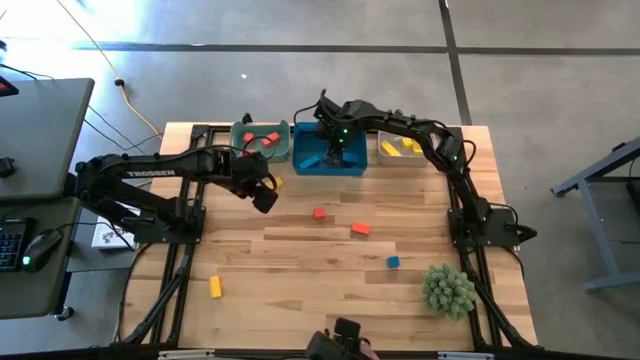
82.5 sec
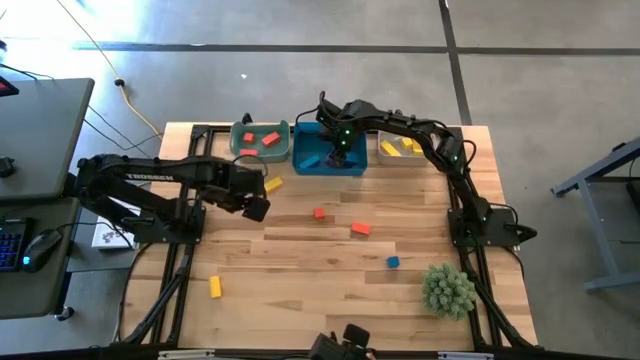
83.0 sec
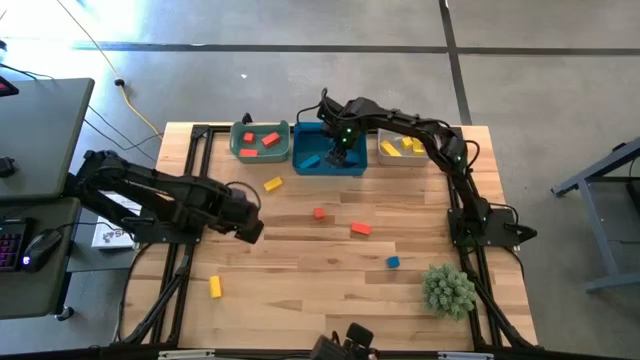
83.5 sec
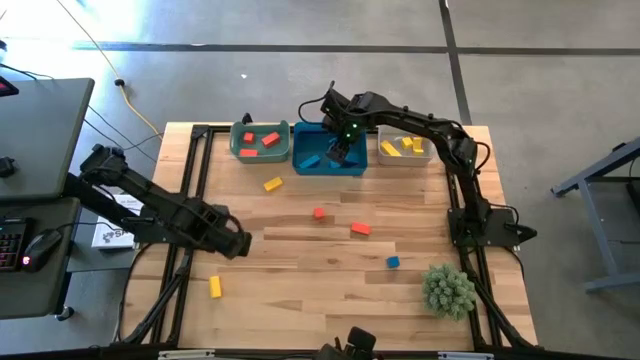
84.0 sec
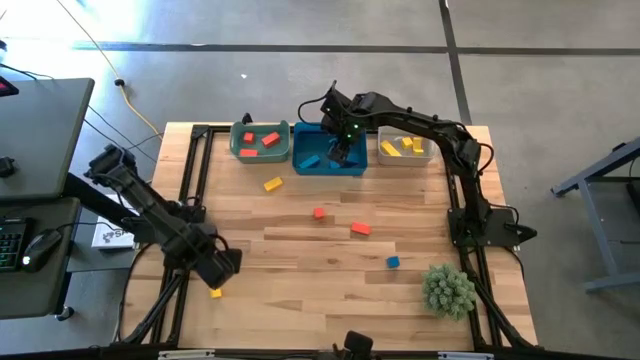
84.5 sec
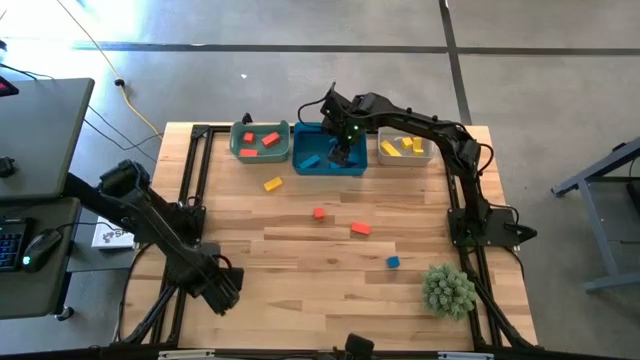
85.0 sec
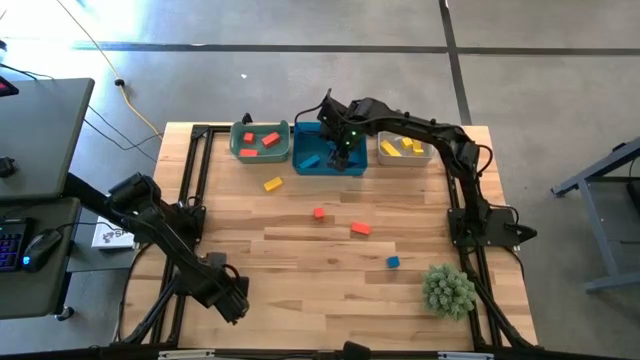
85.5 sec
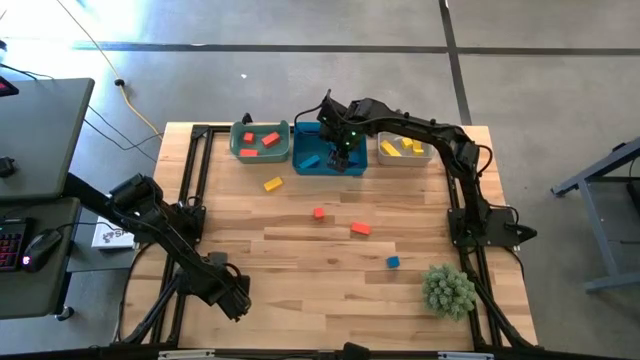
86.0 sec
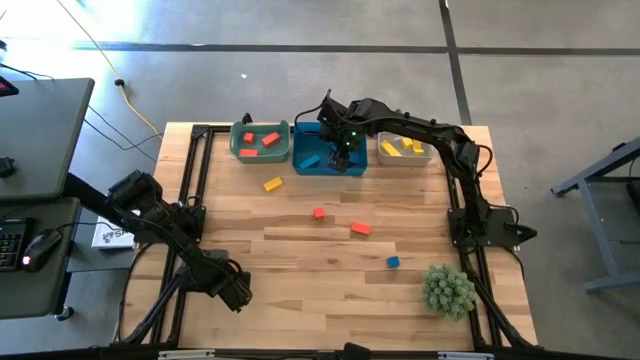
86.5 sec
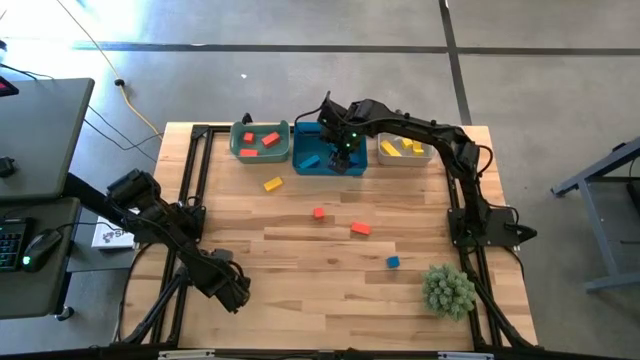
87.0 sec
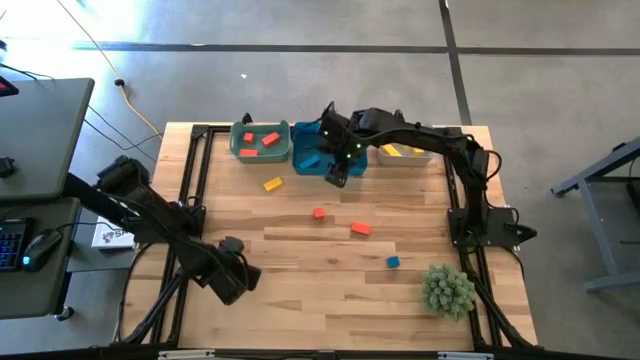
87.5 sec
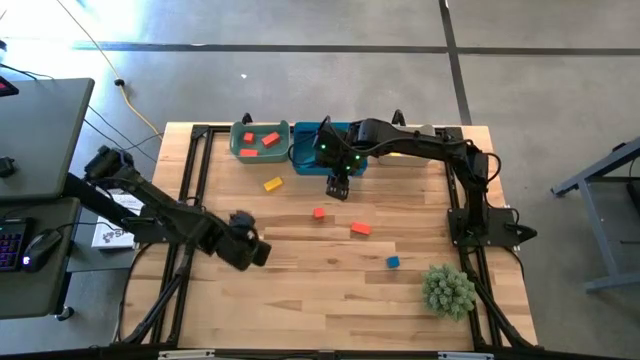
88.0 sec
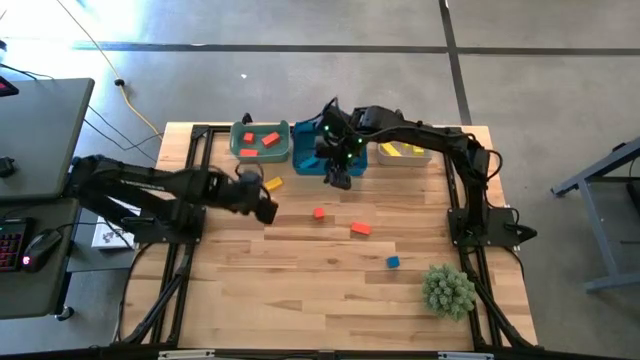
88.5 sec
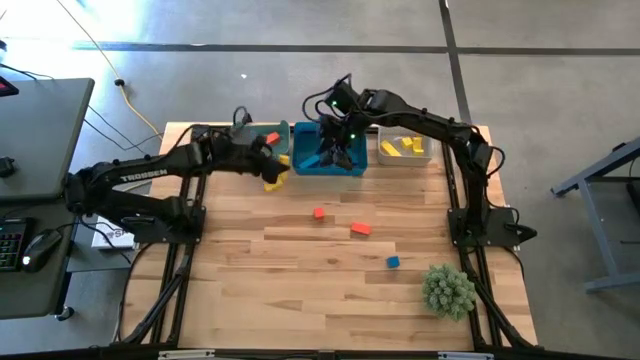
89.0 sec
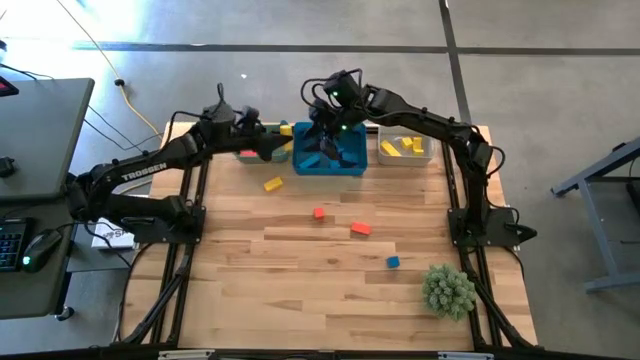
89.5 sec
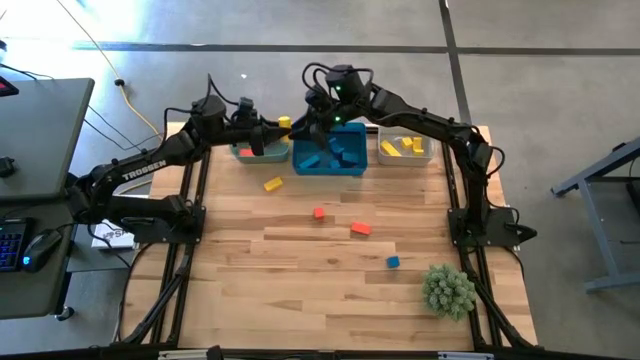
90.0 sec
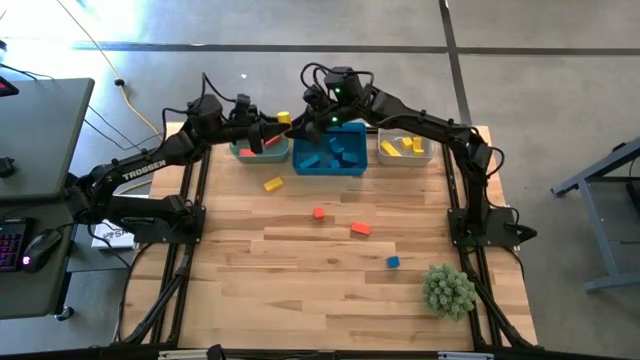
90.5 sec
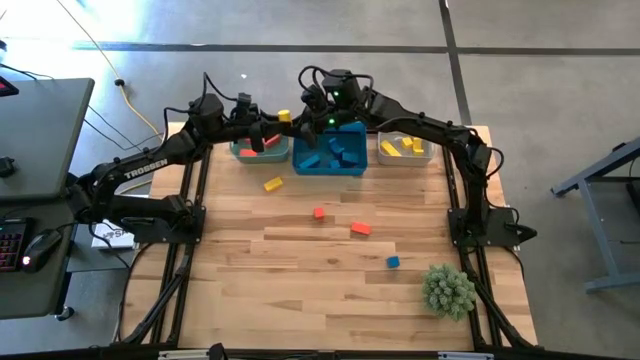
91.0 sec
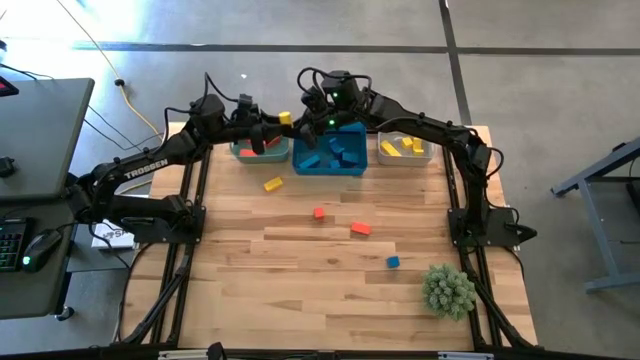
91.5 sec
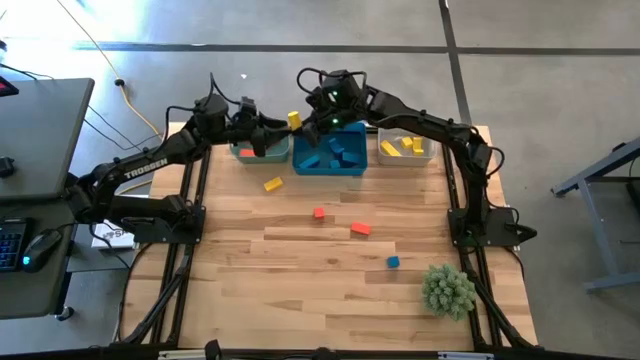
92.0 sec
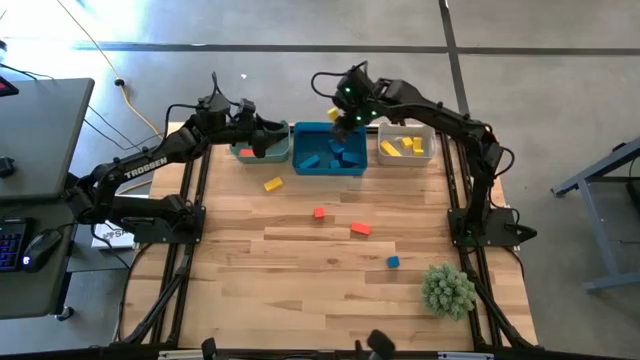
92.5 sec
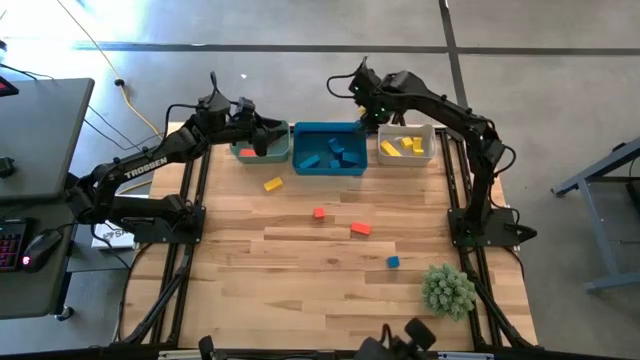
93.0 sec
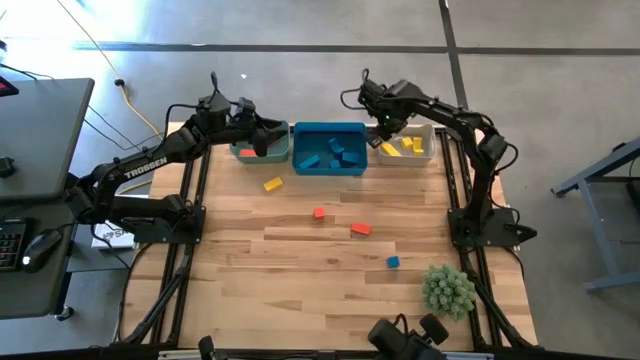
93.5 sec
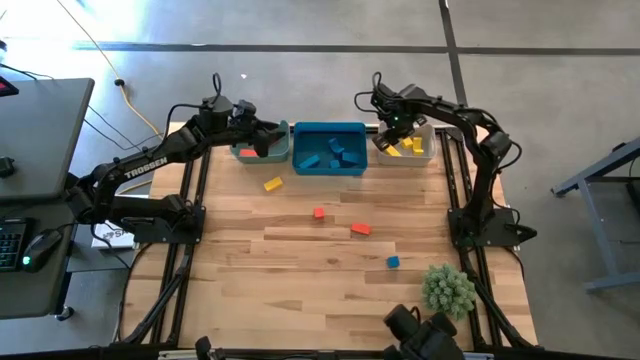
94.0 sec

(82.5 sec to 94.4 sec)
Task: Sort & place blocks by color
Put the yellow block into the white bin

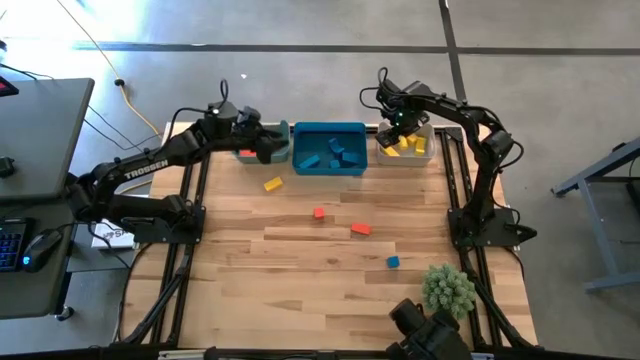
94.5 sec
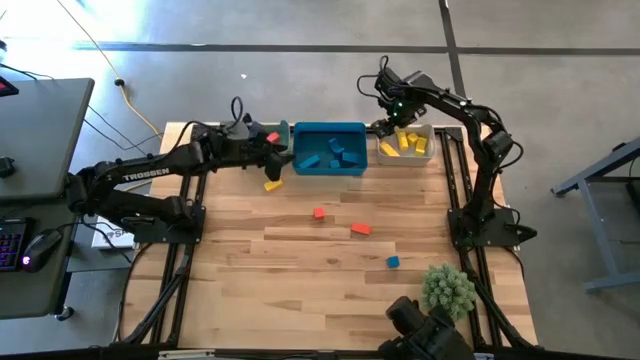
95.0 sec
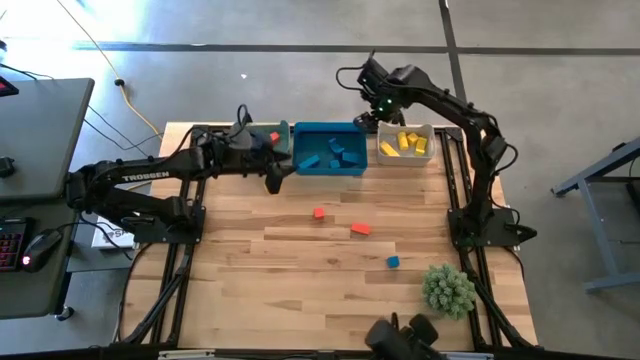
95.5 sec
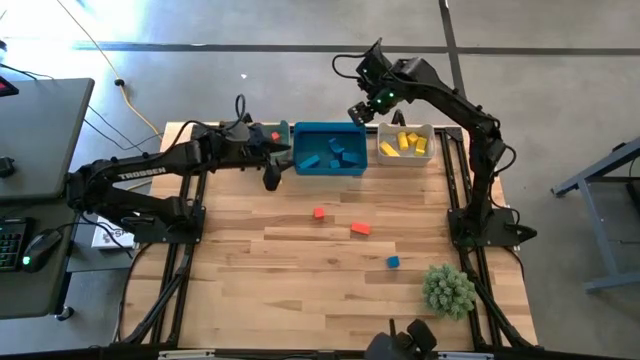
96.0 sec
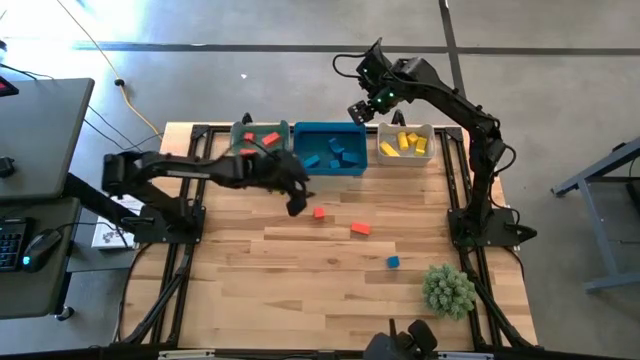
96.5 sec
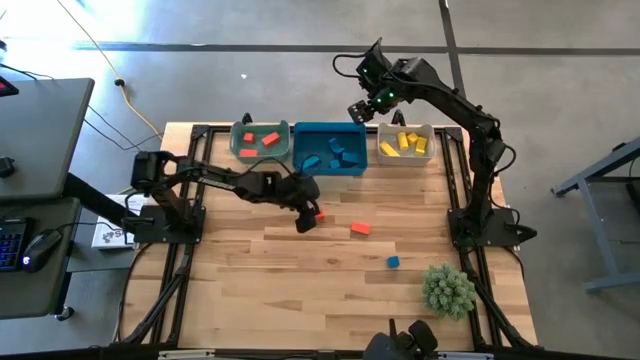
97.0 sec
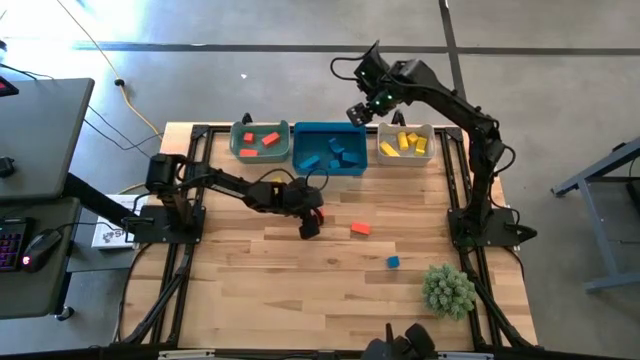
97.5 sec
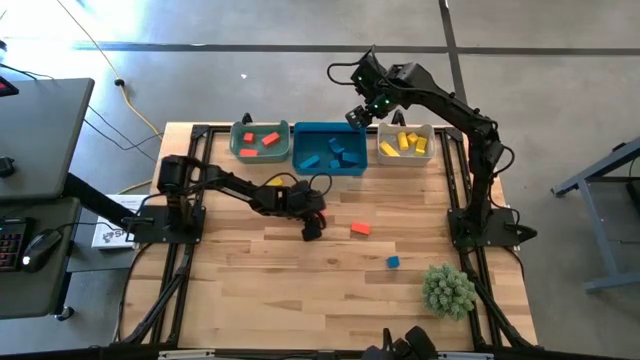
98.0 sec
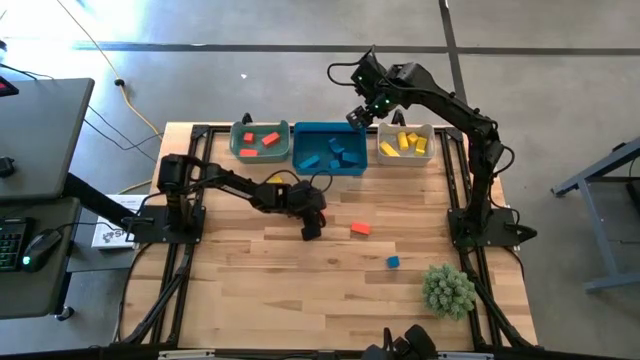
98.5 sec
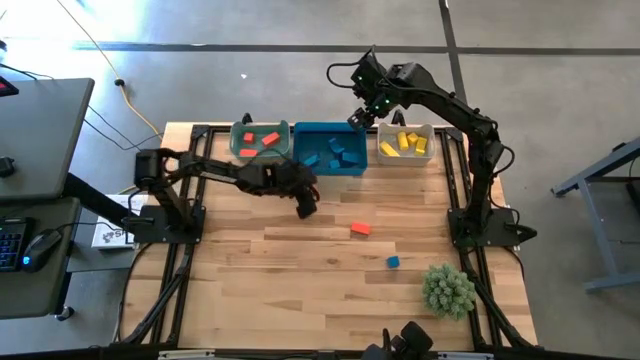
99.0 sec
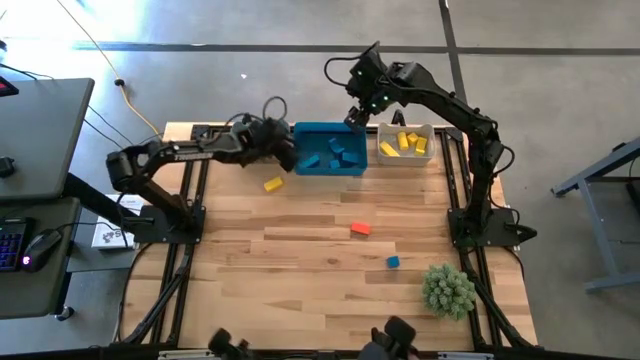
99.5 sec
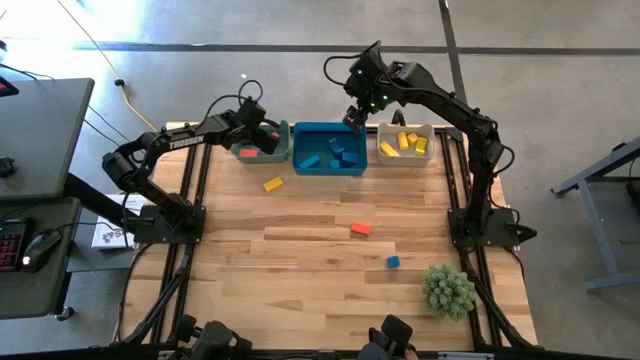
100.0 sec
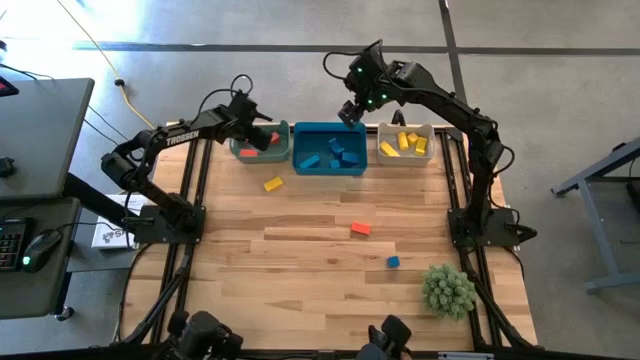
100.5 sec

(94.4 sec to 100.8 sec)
Put the orange block into the green bin

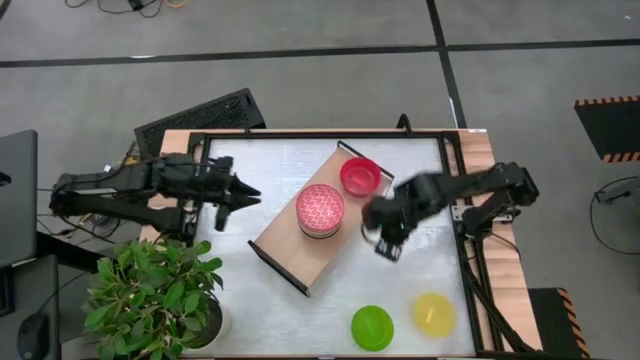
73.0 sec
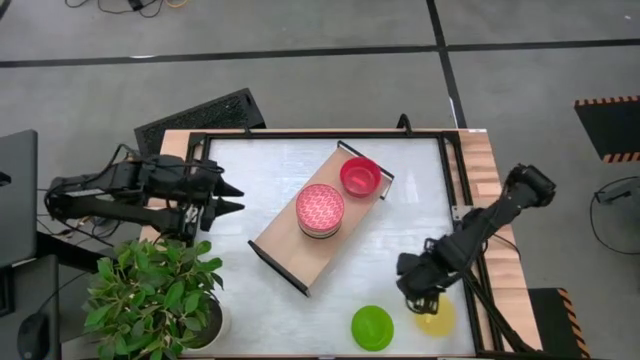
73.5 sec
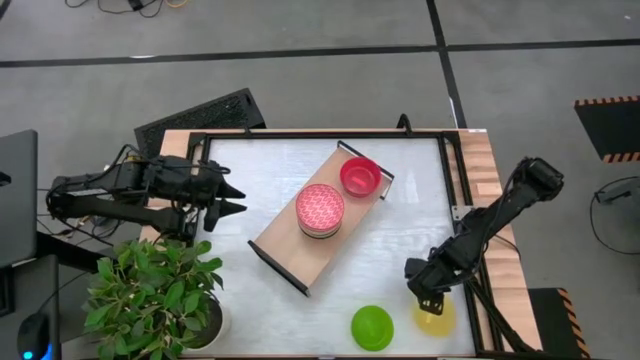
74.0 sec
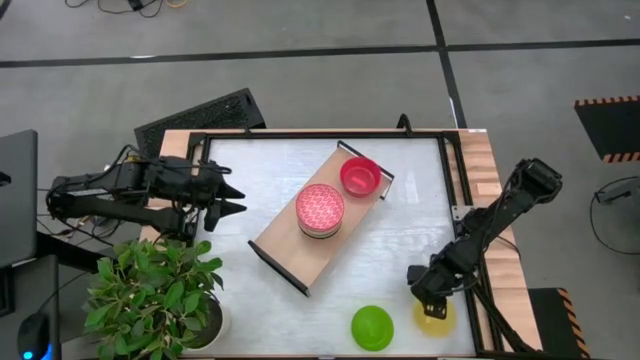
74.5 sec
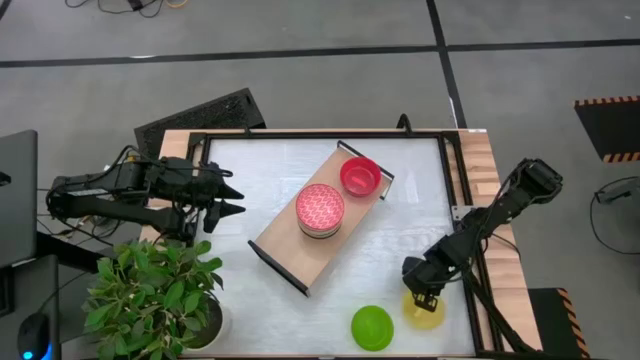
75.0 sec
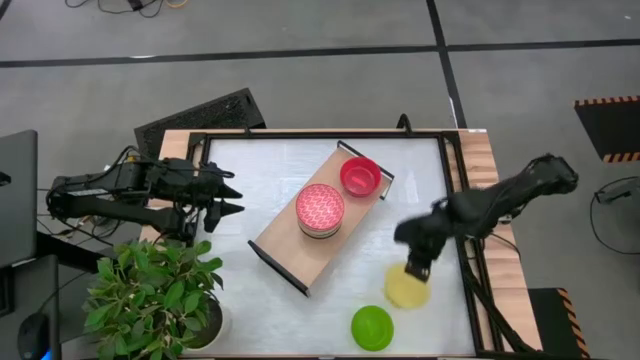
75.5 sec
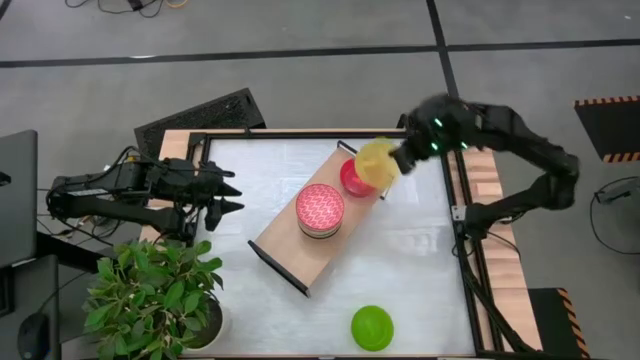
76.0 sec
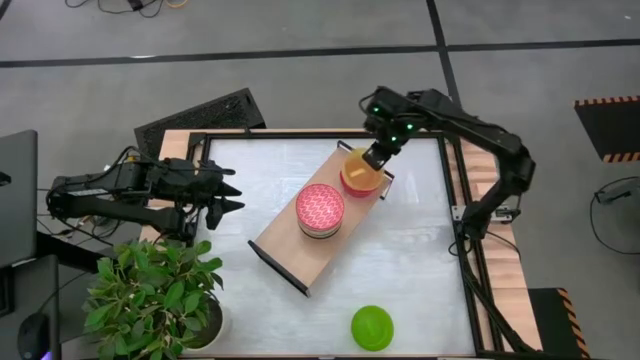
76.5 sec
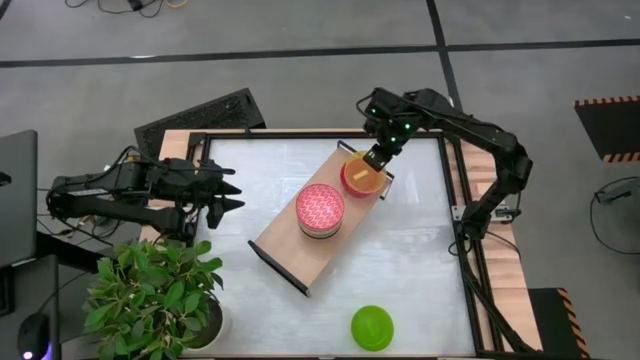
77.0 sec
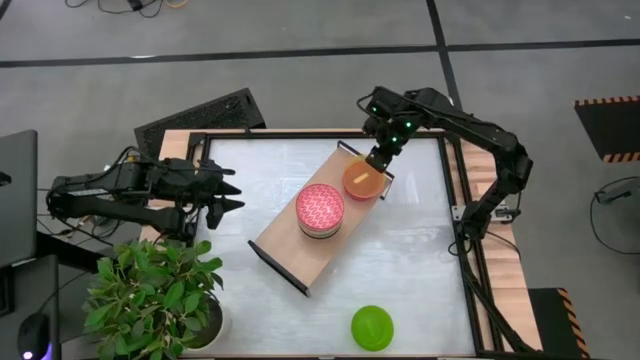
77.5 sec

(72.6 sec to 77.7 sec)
Task: Place and stack bowls onto a shelf
Stack the yellow bowl on top of the orange bowl on the shelf
